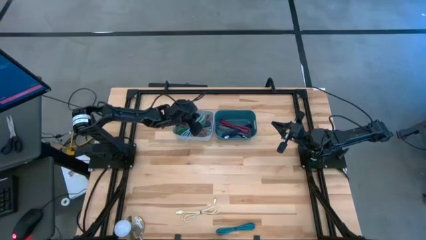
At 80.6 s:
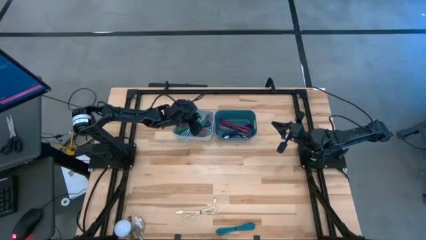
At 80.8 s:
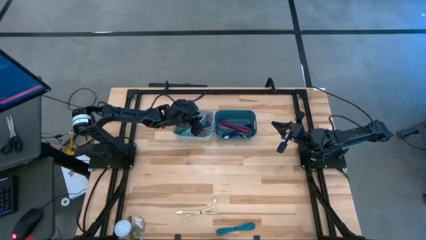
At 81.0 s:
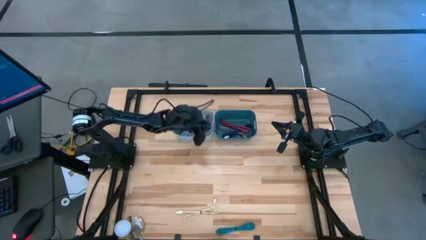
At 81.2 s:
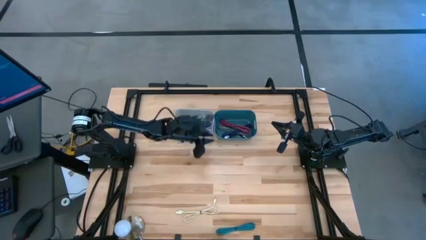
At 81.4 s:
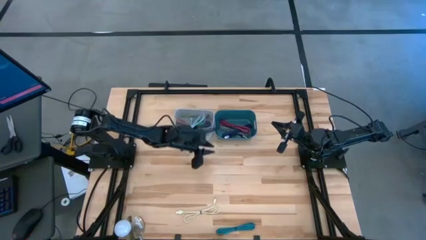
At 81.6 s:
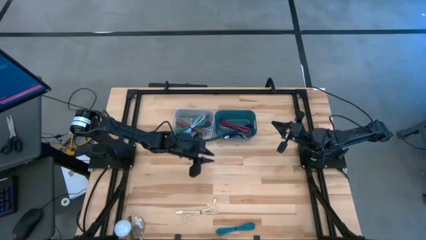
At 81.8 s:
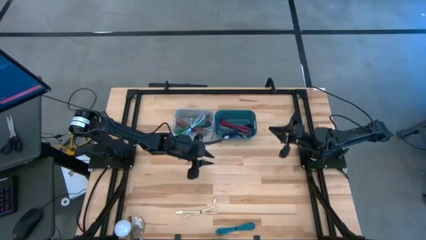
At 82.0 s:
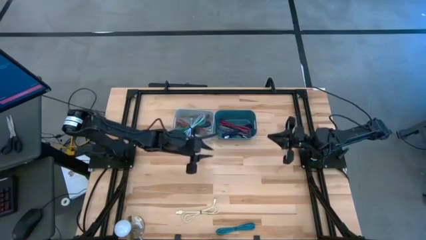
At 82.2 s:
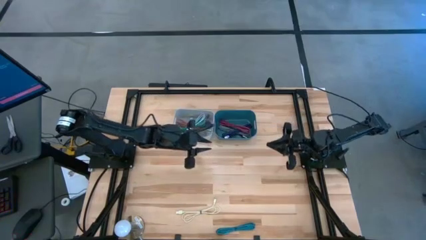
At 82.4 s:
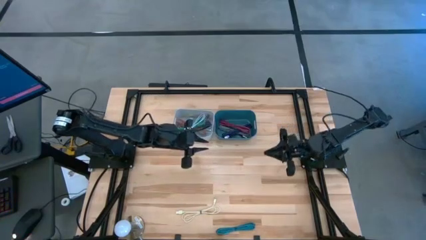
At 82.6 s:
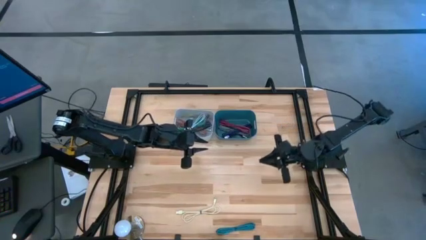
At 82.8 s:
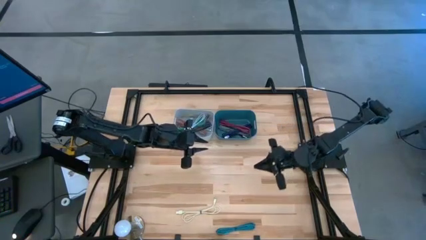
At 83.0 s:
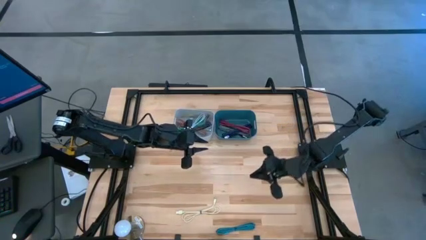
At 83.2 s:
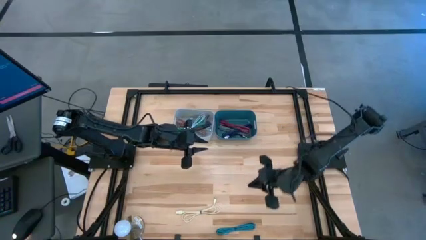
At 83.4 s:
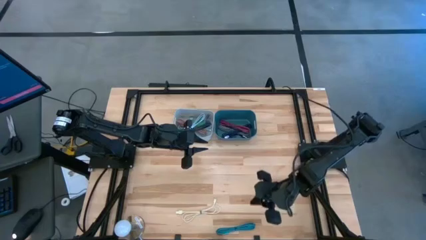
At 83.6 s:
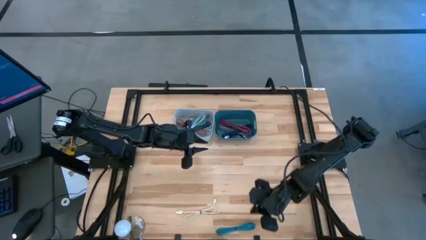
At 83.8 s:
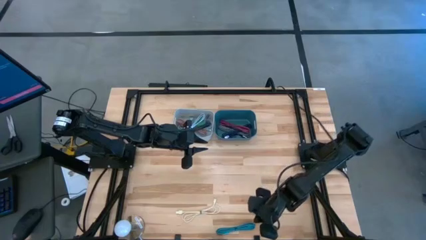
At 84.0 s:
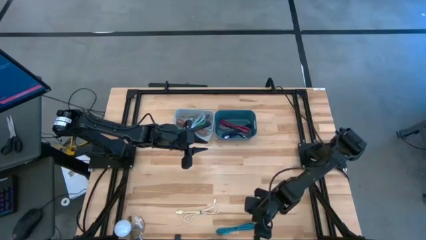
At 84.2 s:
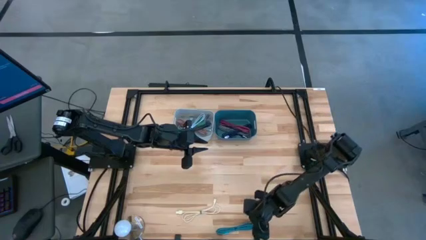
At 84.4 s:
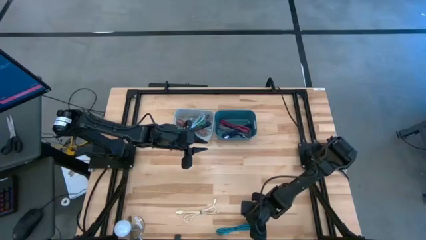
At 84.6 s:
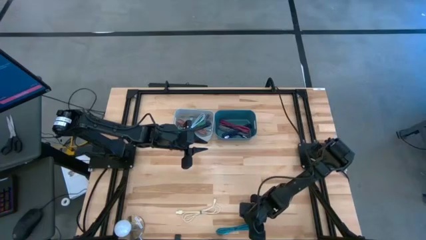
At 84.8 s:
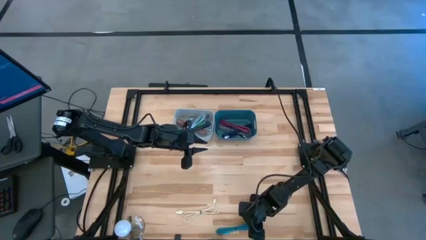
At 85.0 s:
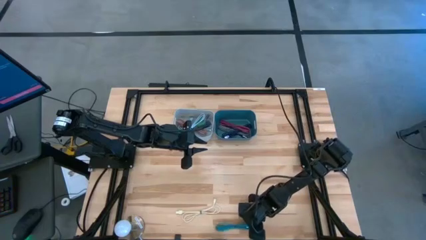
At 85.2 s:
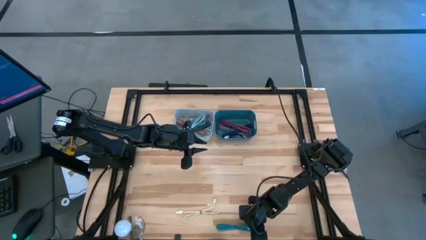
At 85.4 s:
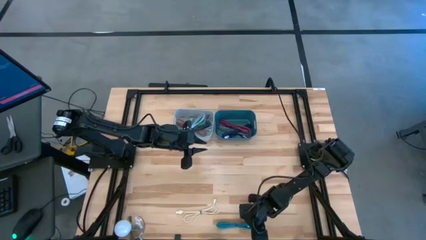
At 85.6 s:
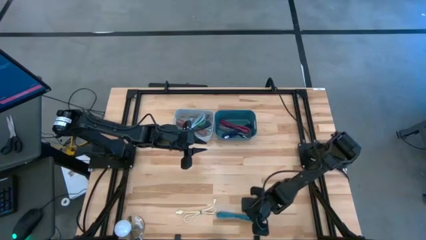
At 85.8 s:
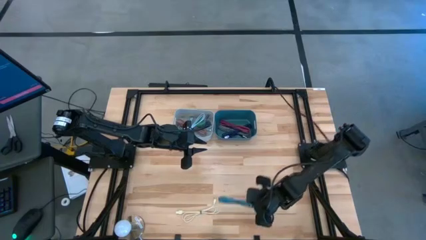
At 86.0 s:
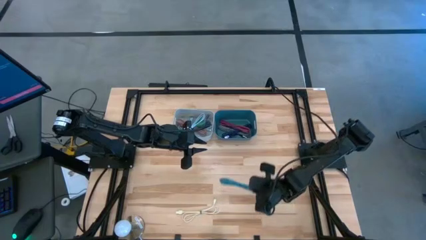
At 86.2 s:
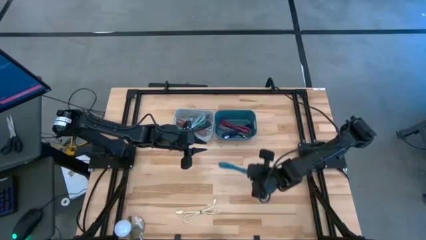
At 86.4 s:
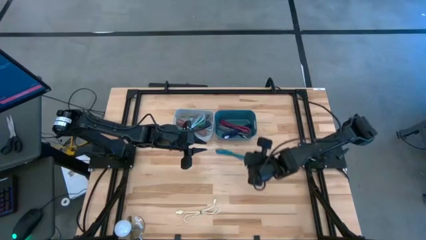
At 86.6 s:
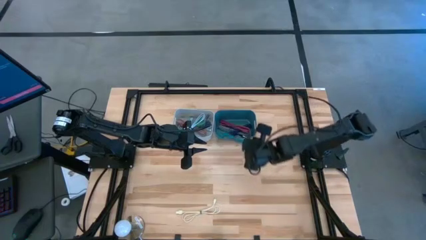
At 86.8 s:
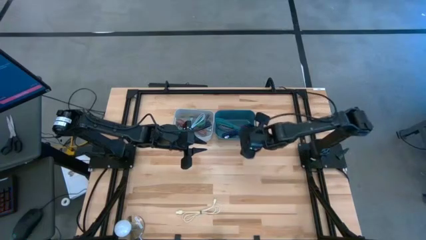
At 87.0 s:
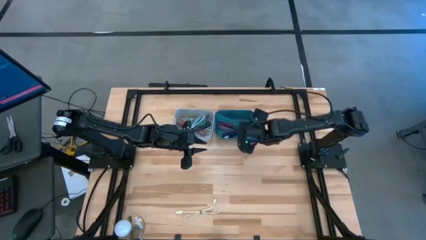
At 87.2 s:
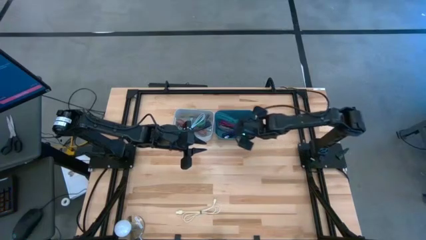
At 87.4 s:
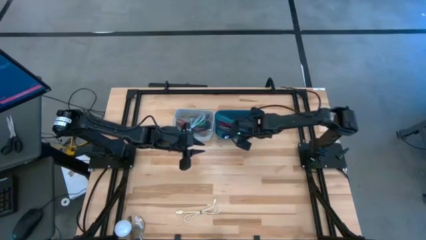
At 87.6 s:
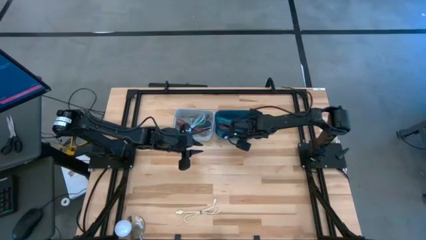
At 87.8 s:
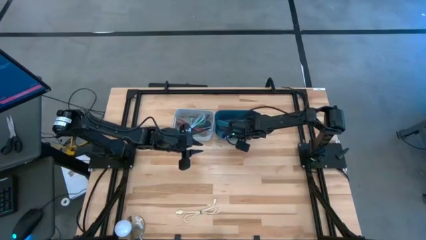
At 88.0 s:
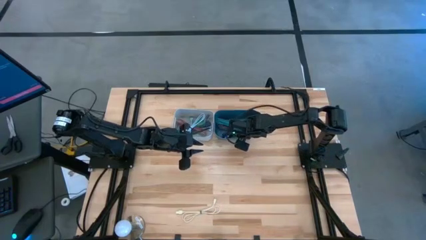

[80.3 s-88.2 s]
Task: Pick & Place USB Port
Put the blue patterned charger cable into the green bin

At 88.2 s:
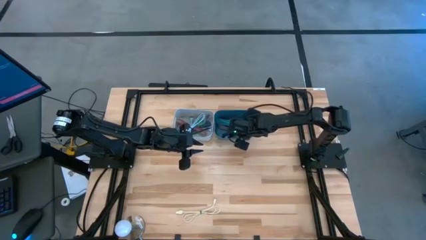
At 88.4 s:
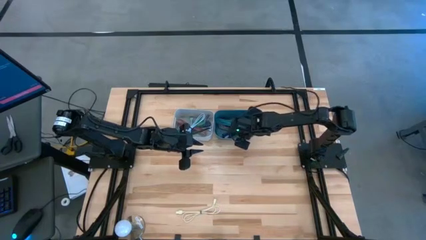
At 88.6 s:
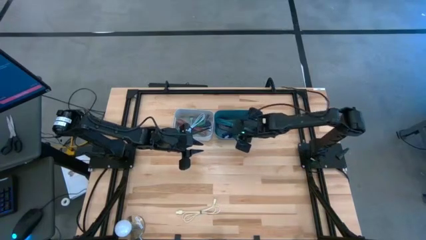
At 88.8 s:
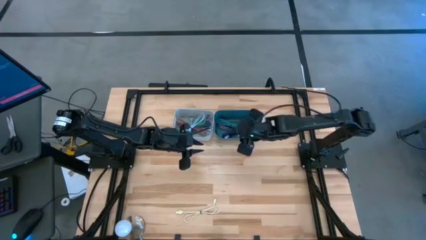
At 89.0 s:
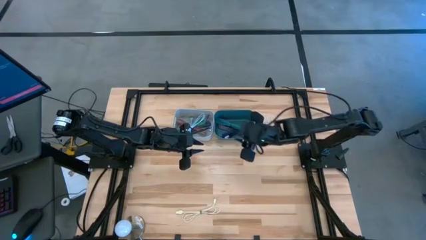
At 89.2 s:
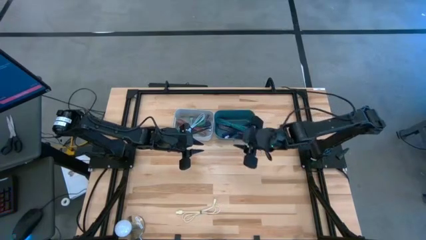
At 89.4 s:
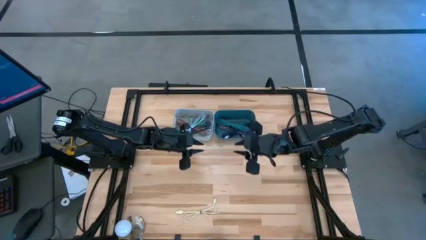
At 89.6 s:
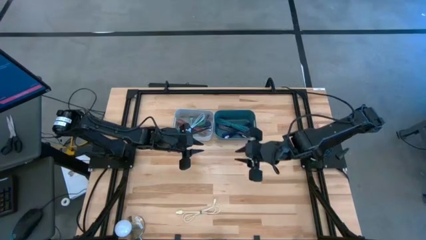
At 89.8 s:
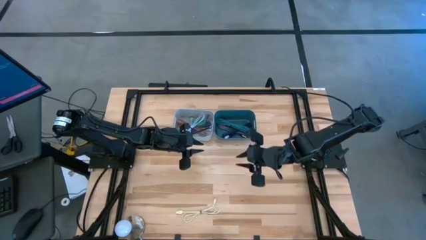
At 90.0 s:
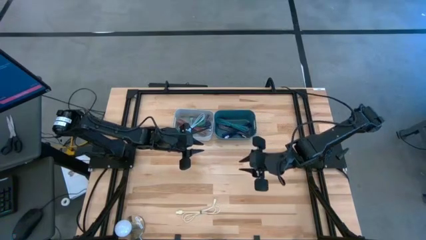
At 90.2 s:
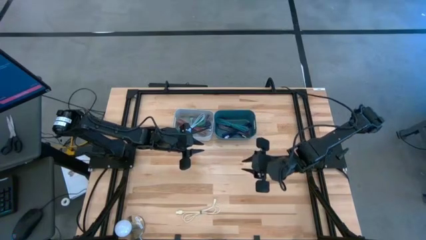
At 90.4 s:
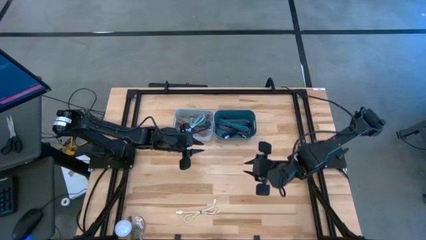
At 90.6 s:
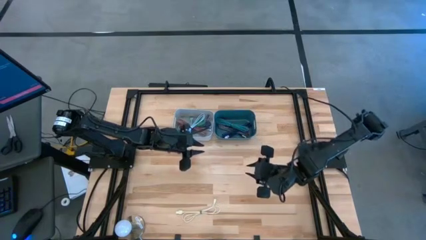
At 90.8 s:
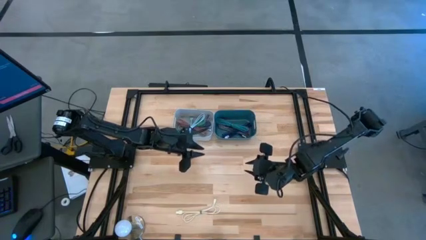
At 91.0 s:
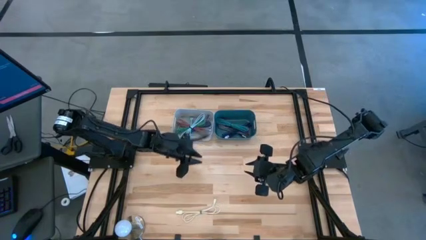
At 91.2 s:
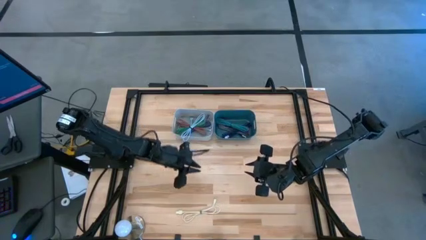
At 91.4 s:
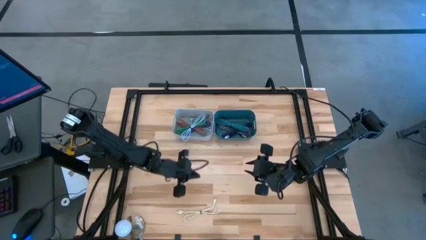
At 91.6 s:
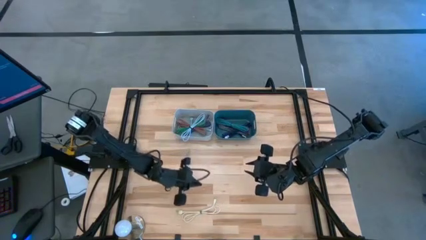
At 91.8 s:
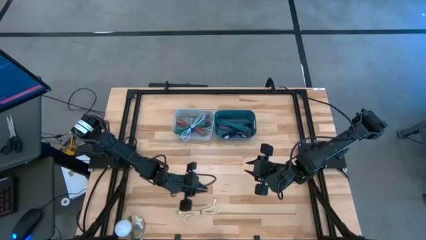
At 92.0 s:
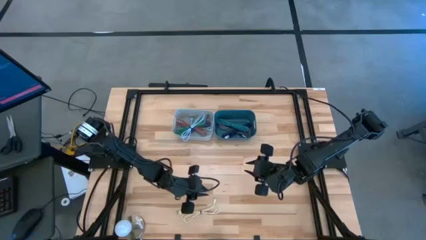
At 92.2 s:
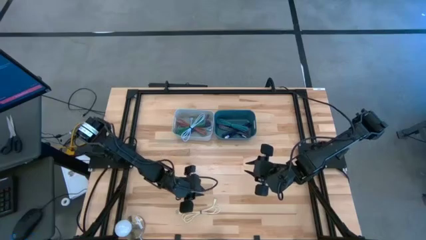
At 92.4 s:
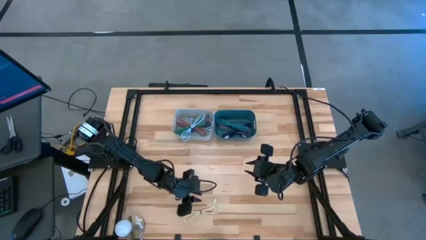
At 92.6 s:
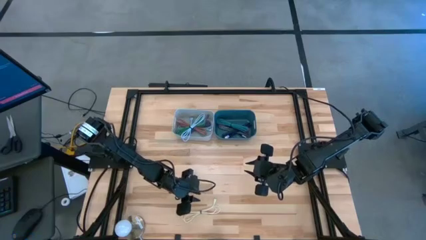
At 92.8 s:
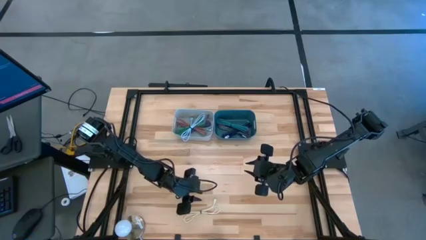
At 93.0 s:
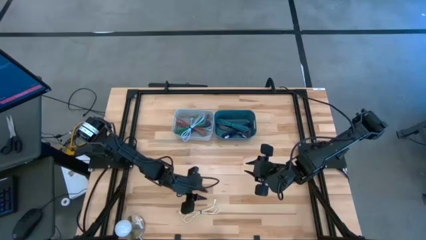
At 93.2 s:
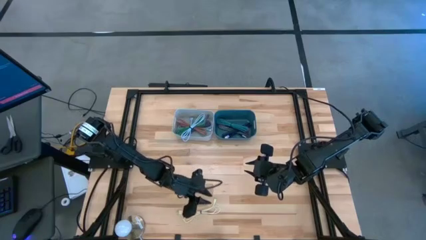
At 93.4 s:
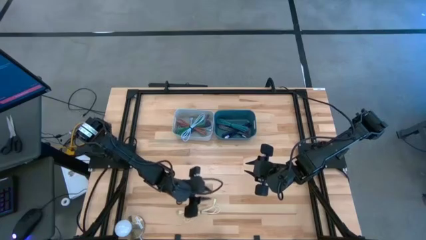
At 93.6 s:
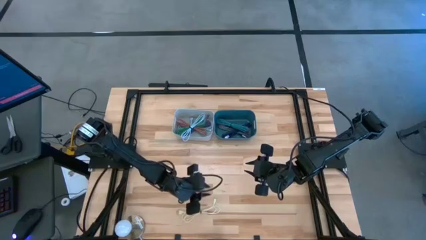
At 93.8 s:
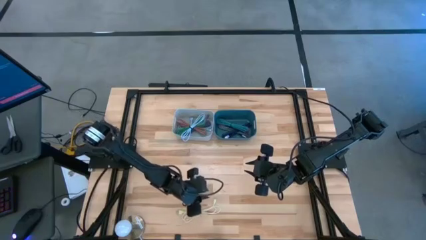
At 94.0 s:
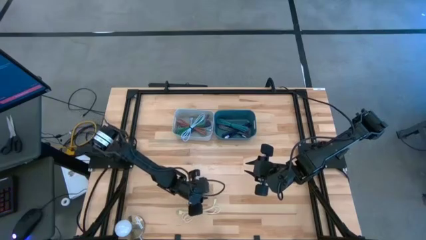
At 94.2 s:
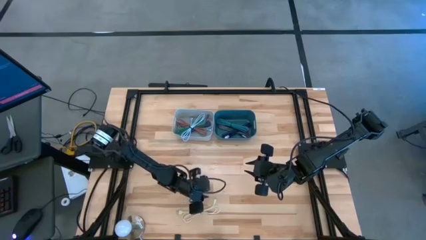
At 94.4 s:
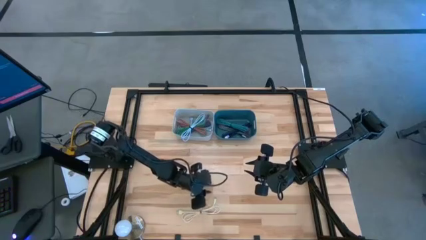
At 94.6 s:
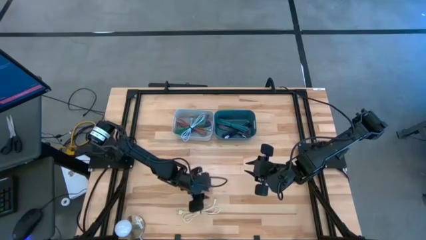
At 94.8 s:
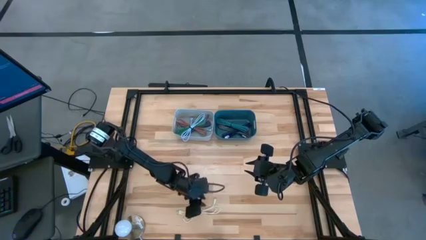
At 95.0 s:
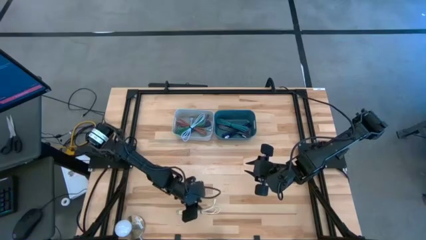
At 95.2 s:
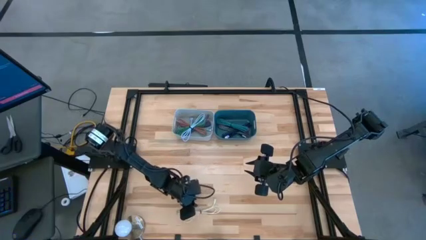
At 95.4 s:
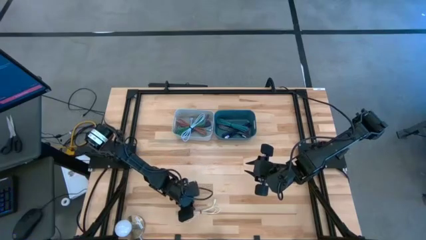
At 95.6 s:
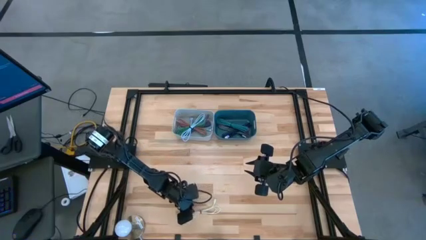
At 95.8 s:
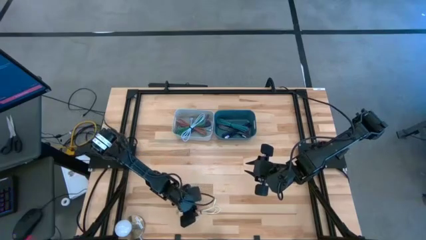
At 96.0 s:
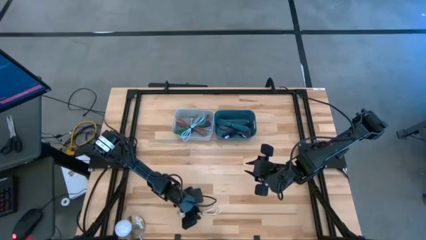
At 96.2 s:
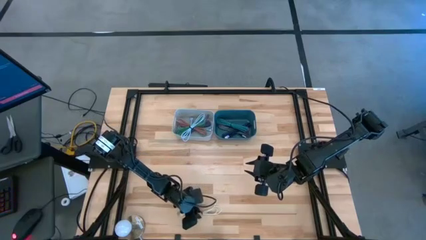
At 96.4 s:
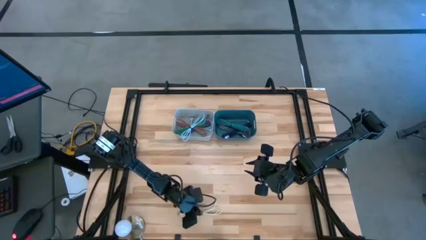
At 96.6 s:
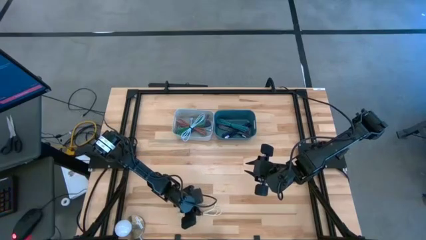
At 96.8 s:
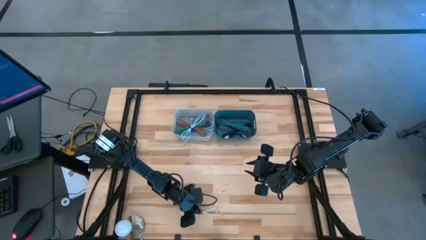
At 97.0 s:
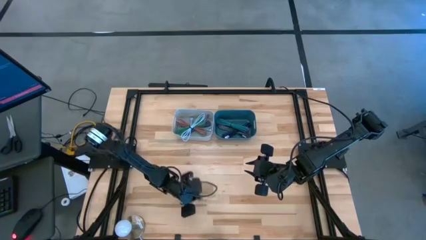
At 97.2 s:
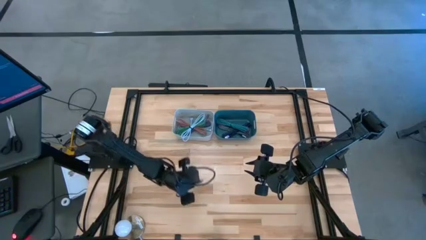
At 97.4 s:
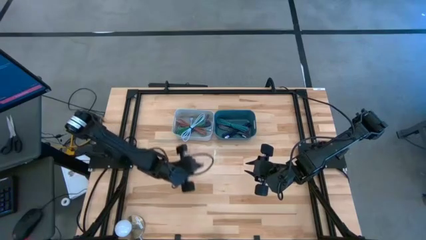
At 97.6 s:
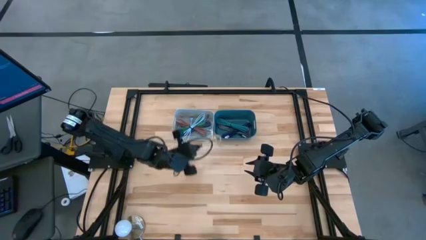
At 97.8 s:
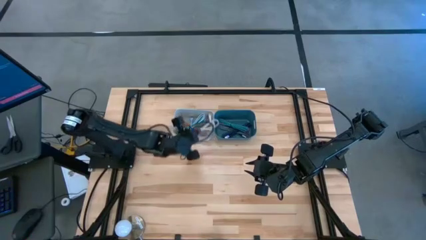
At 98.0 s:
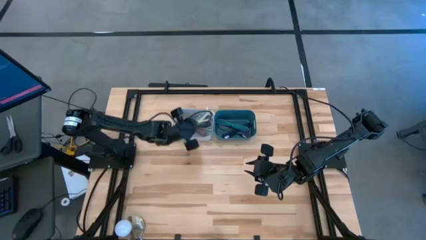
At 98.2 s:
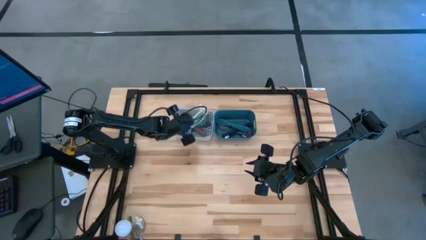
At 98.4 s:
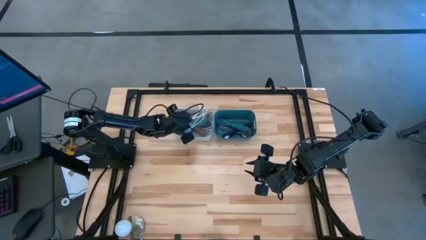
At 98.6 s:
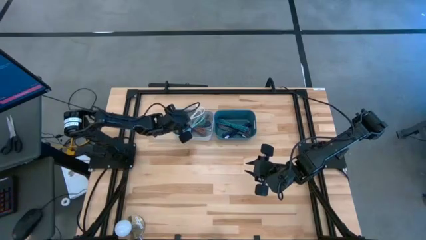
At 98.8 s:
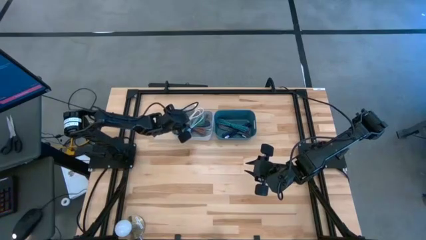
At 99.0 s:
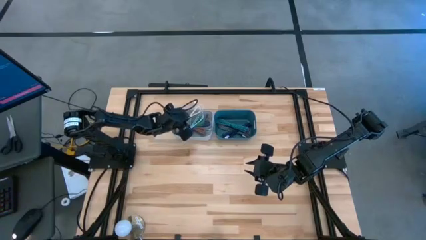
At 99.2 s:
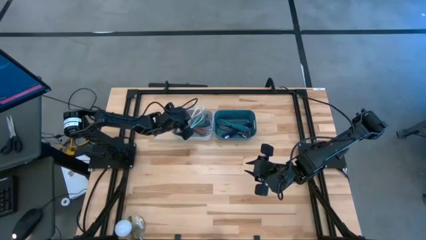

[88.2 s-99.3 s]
Put the white charger cable into the white bin
